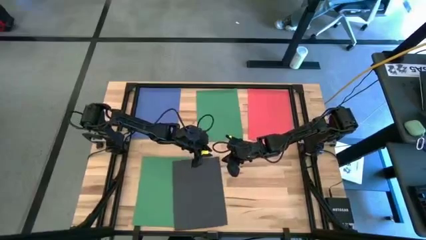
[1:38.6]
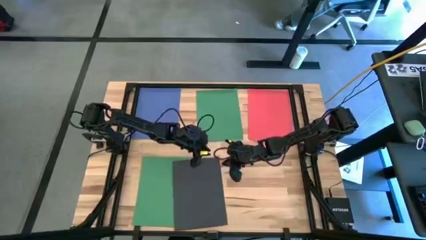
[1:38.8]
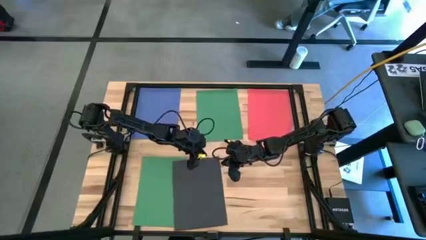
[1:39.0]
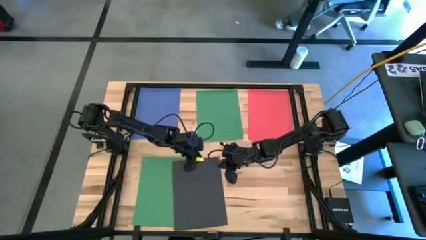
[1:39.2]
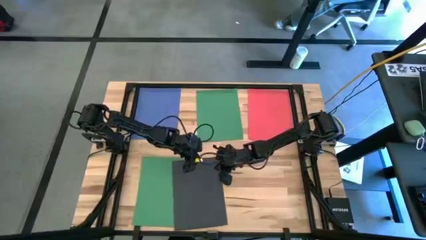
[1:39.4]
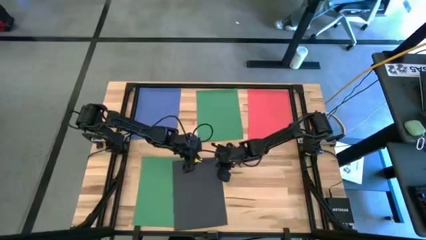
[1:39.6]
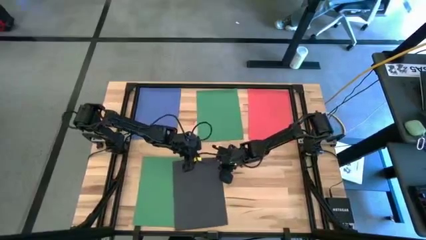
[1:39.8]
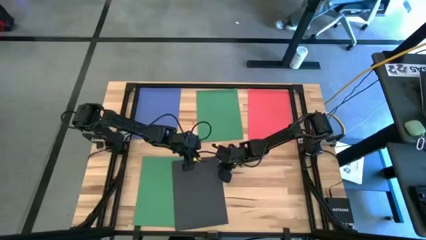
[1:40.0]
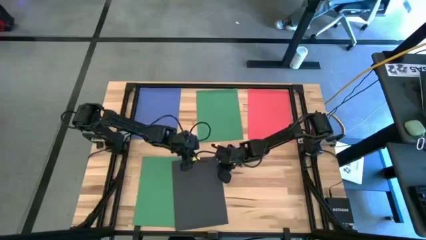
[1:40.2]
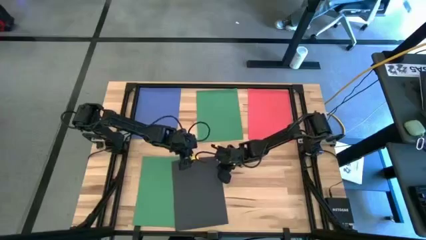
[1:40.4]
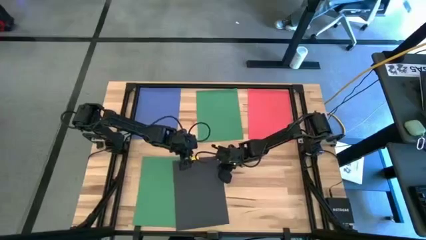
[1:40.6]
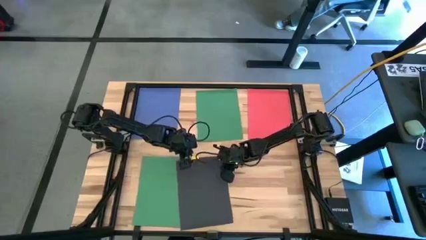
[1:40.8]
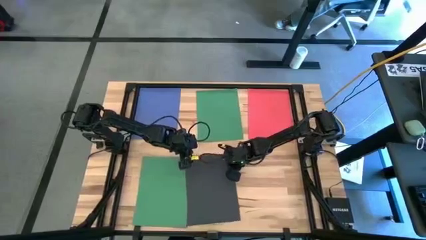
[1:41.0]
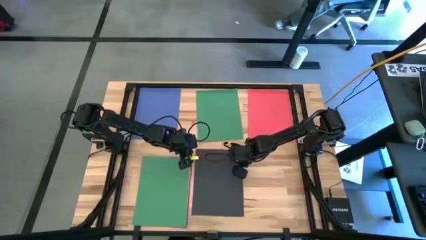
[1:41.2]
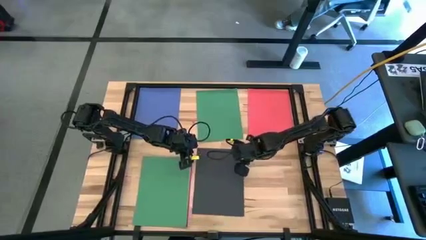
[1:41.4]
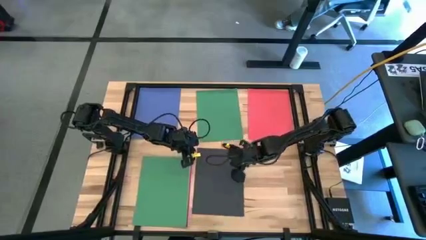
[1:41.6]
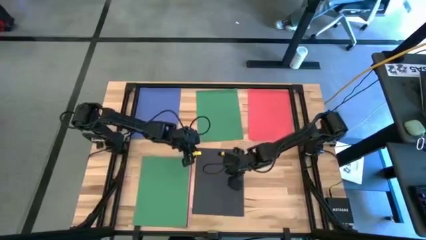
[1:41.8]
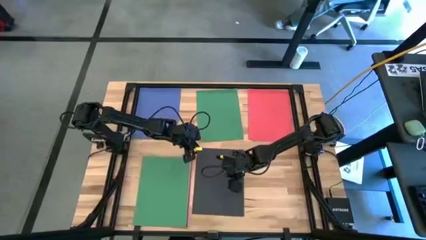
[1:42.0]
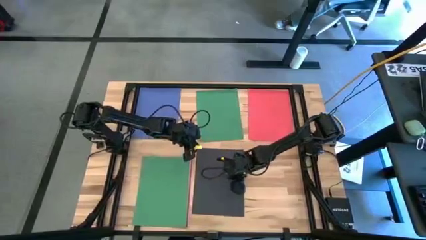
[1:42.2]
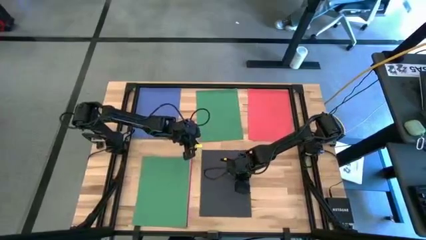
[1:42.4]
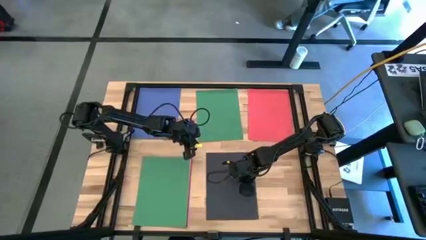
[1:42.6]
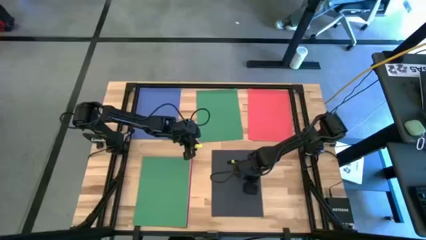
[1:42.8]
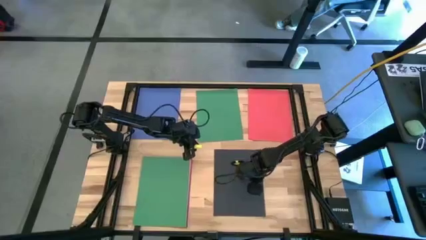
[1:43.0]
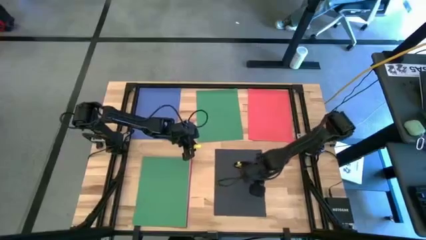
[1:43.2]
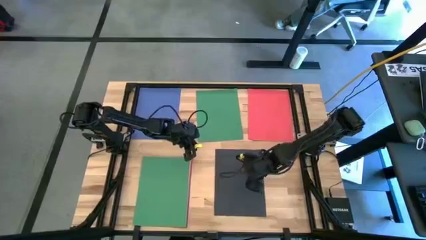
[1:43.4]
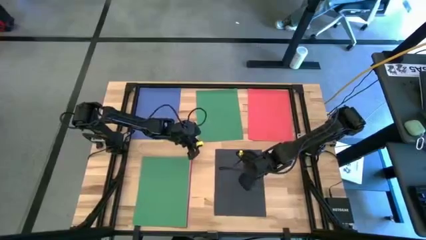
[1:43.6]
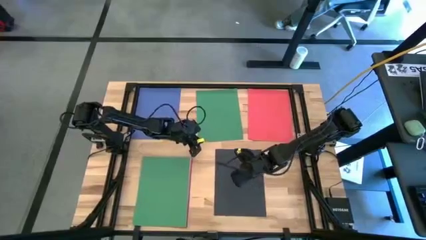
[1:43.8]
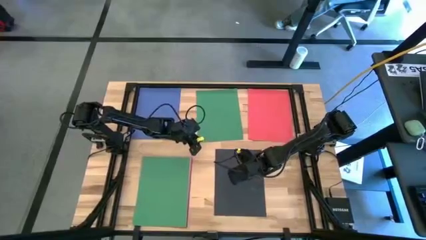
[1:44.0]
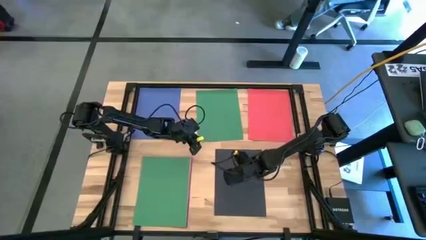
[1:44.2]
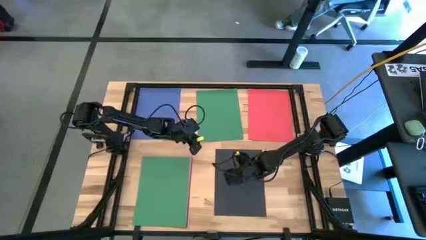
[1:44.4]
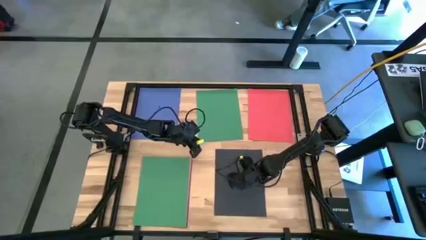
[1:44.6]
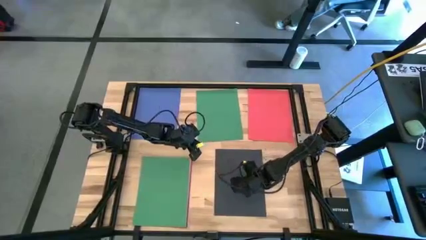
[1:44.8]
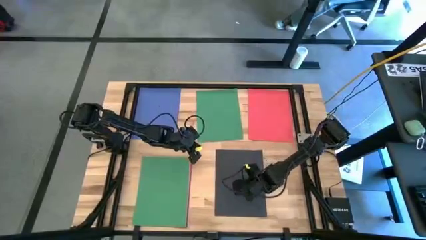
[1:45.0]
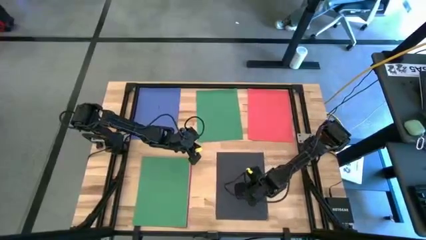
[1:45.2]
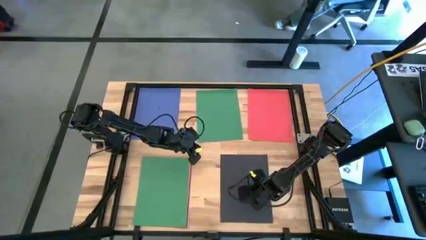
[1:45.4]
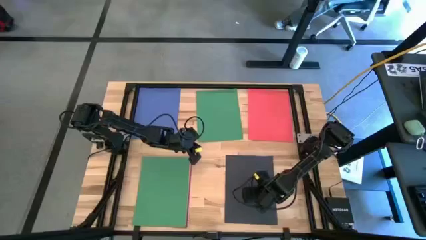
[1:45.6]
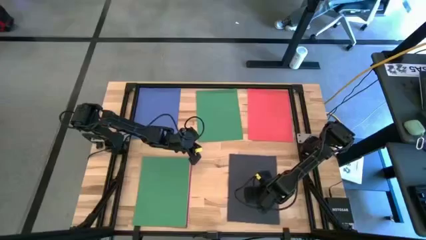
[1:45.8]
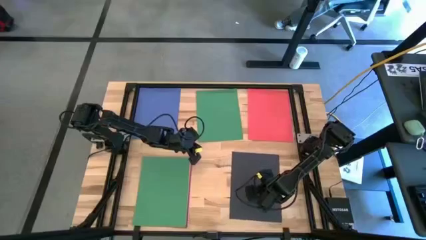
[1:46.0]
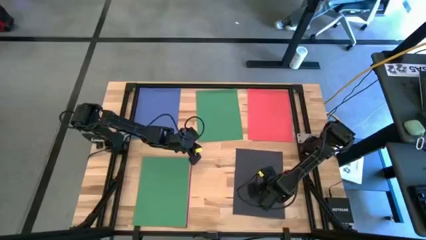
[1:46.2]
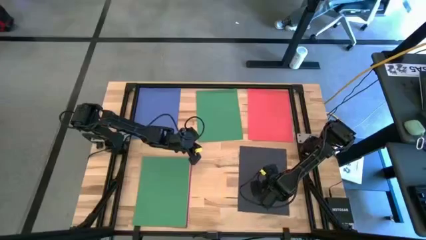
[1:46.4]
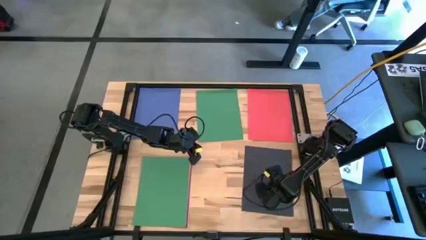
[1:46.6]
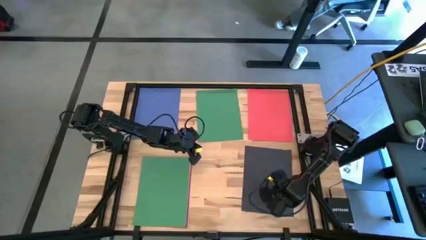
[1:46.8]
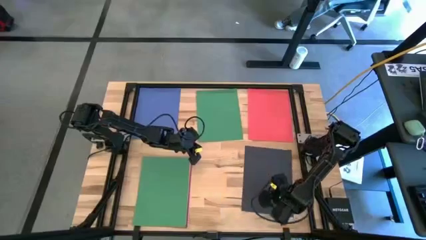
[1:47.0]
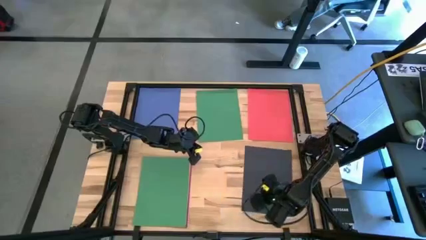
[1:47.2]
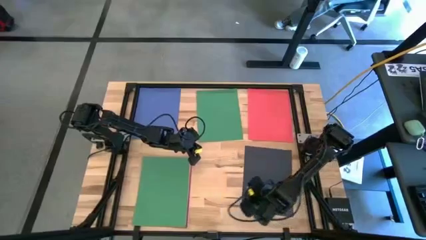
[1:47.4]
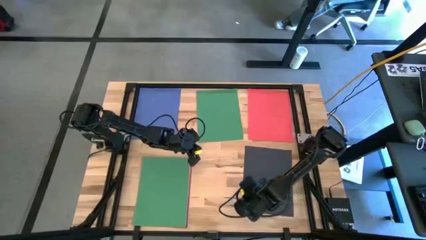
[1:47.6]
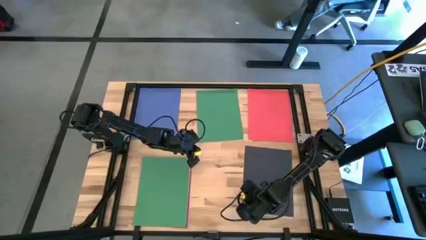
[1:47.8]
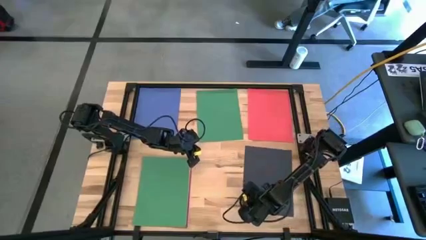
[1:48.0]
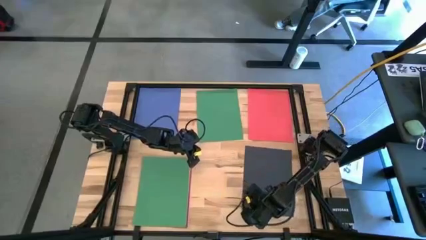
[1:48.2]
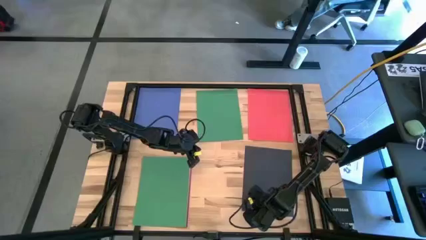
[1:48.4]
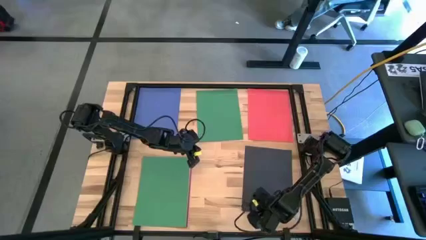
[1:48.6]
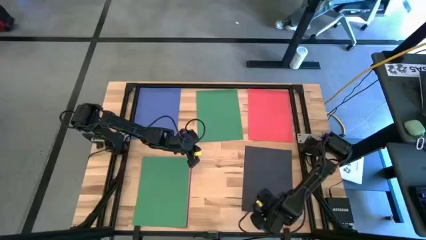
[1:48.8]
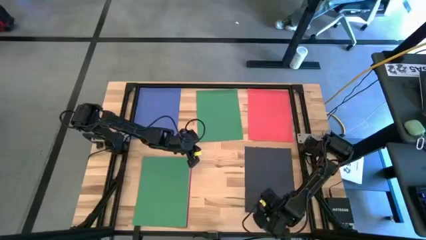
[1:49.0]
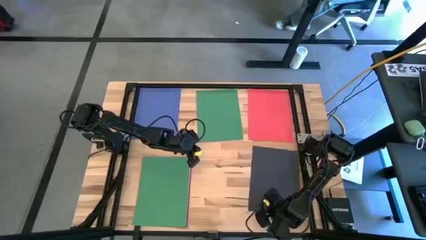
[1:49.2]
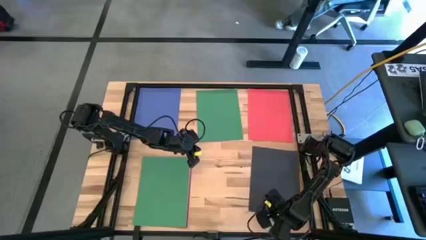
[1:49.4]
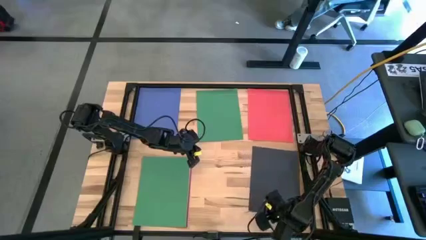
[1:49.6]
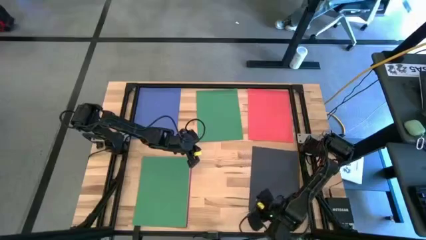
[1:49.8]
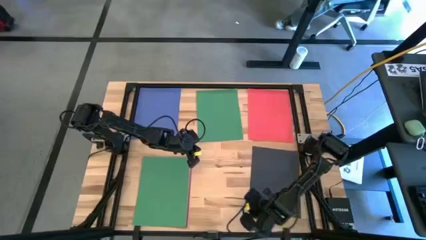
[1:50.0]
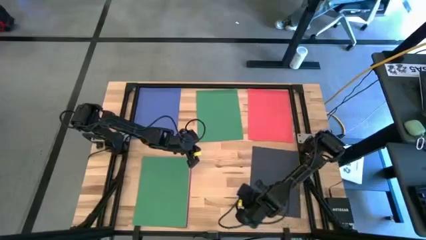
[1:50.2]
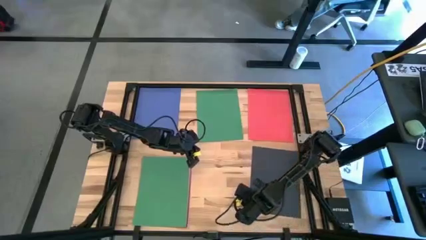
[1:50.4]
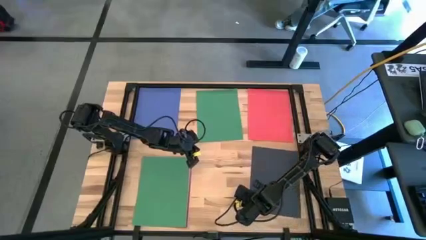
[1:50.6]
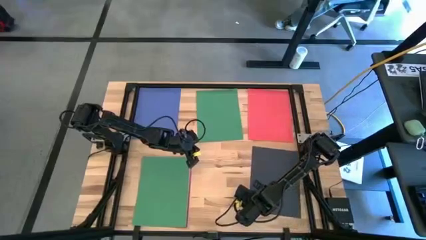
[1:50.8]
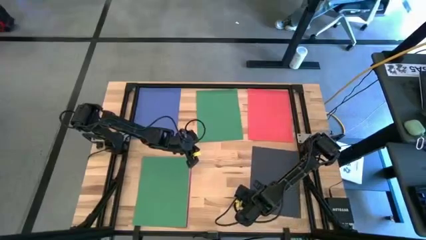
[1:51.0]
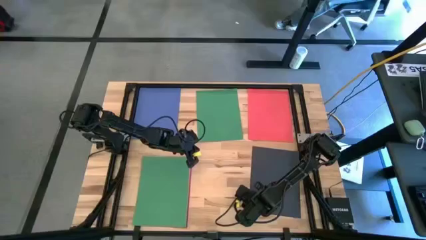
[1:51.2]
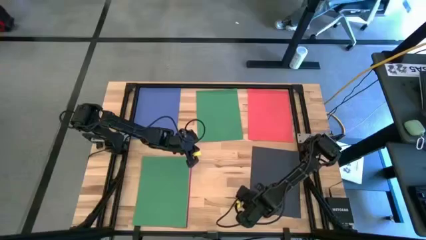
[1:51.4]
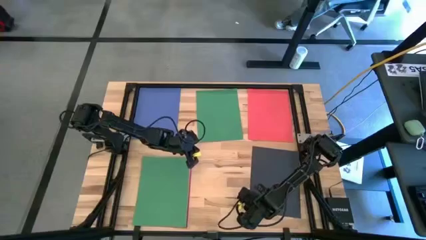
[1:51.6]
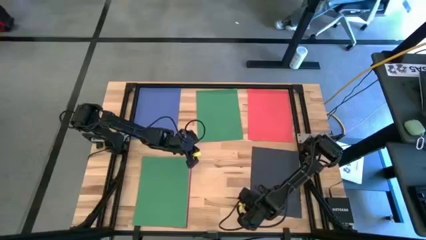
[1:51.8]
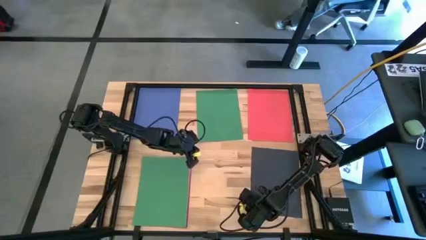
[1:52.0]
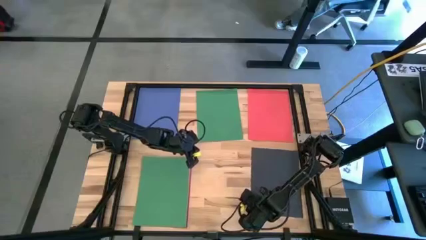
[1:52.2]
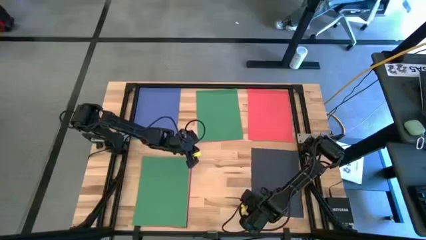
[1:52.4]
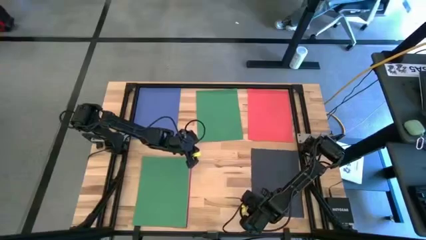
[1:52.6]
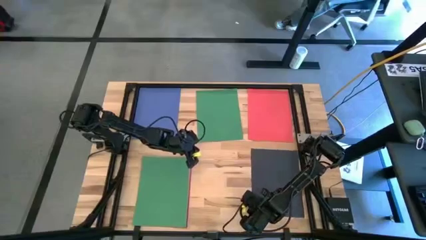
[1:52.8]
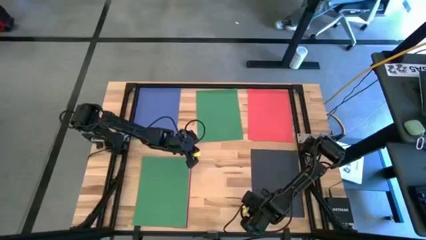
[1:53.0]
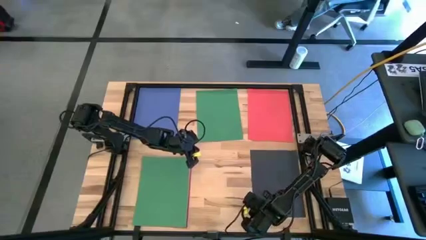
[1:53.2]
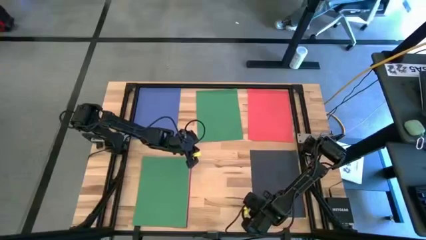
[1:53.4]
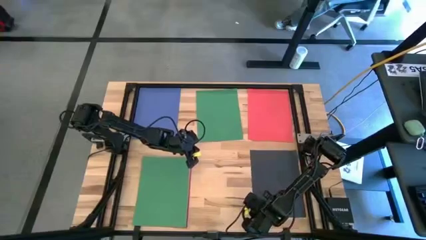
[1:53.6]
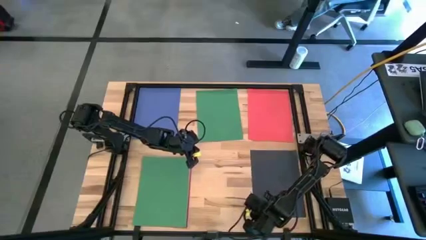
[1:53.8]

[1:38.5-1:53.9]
Task: Organize paper
Move the black paper to the bottom right of the table
